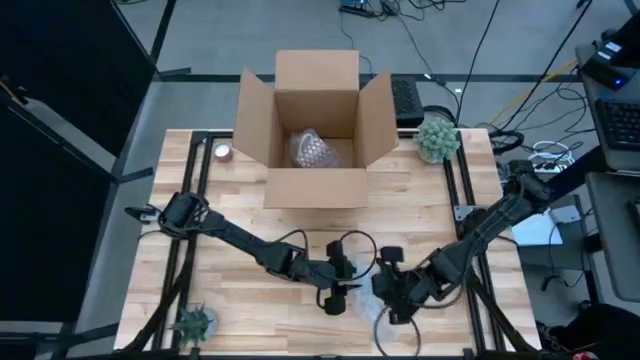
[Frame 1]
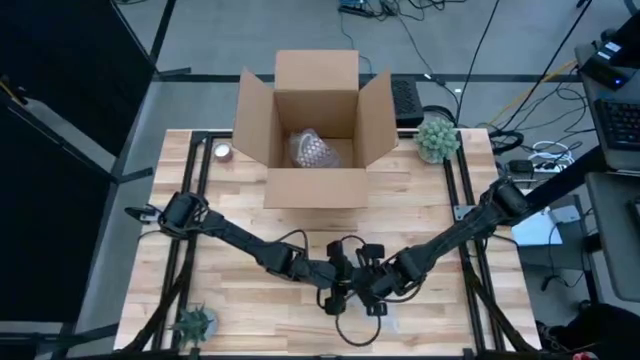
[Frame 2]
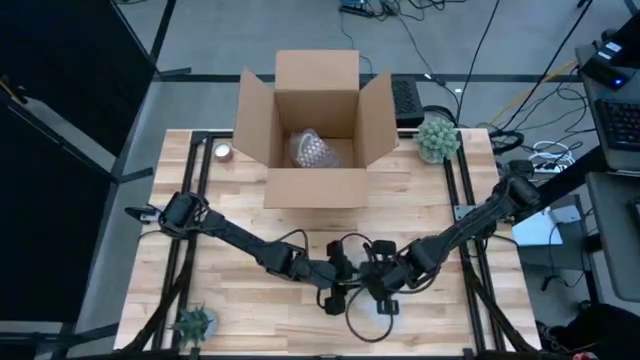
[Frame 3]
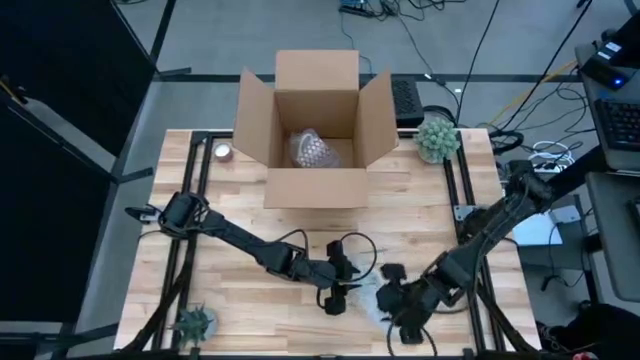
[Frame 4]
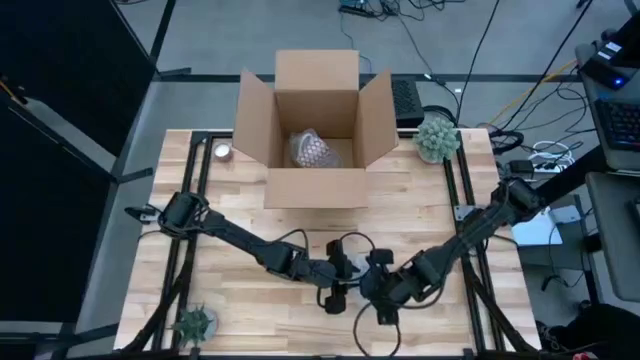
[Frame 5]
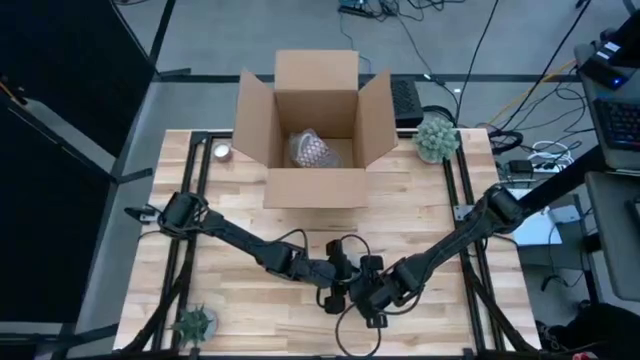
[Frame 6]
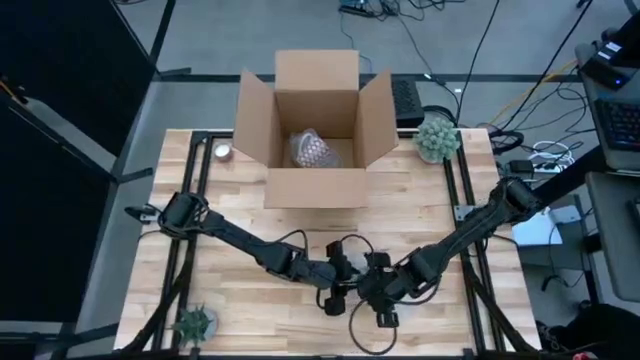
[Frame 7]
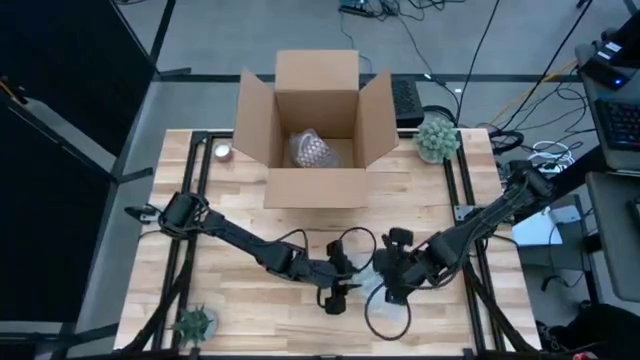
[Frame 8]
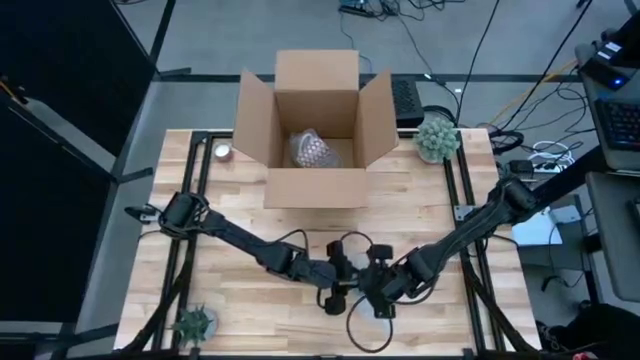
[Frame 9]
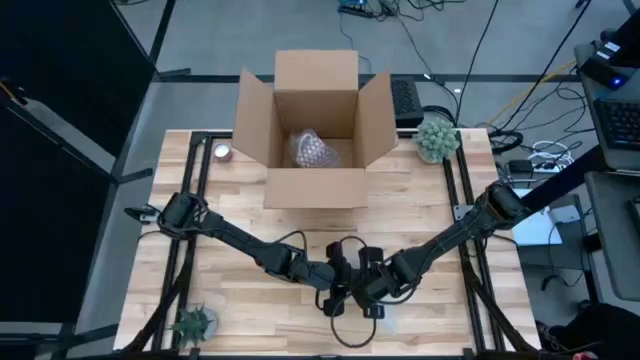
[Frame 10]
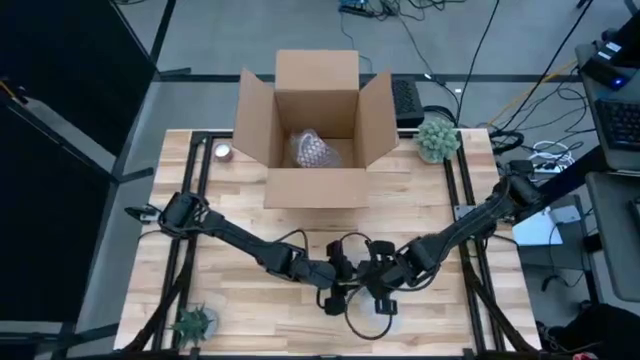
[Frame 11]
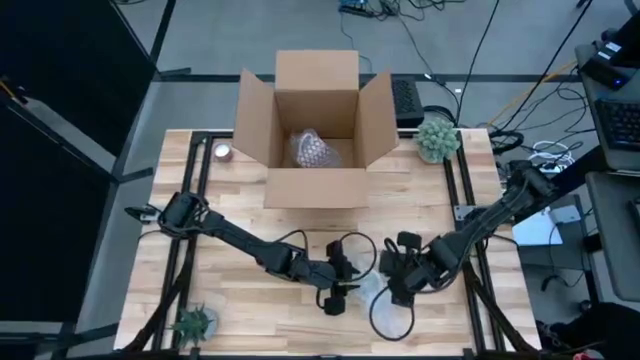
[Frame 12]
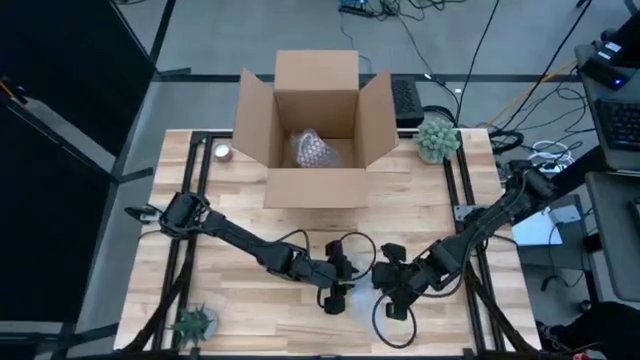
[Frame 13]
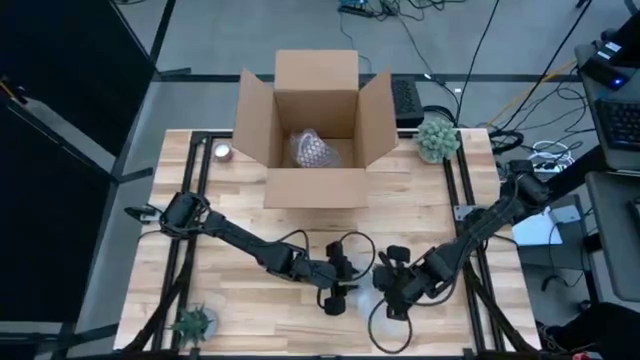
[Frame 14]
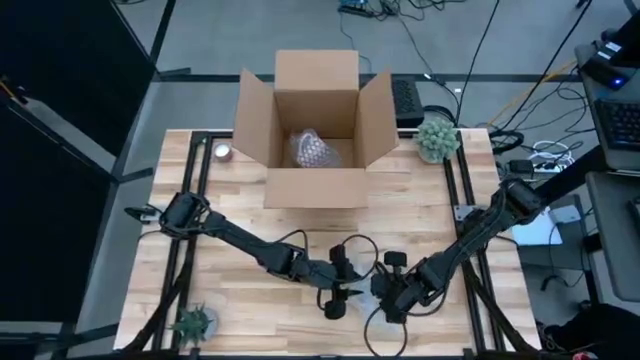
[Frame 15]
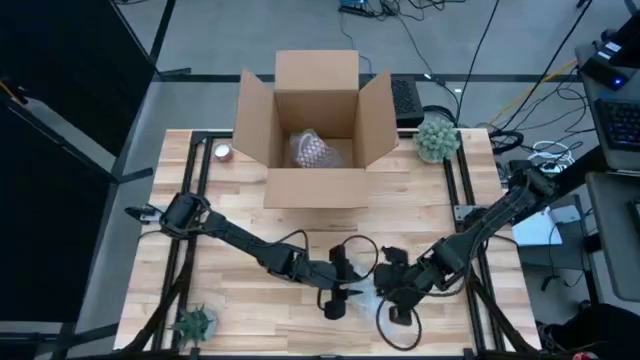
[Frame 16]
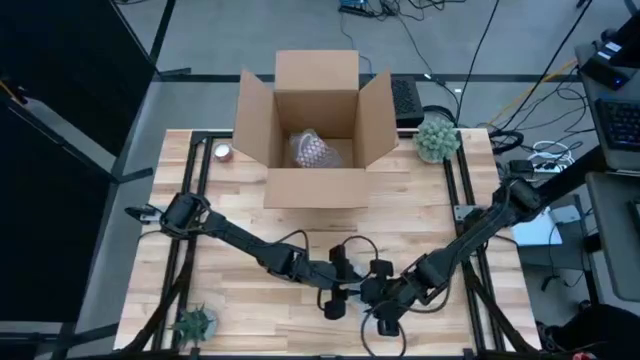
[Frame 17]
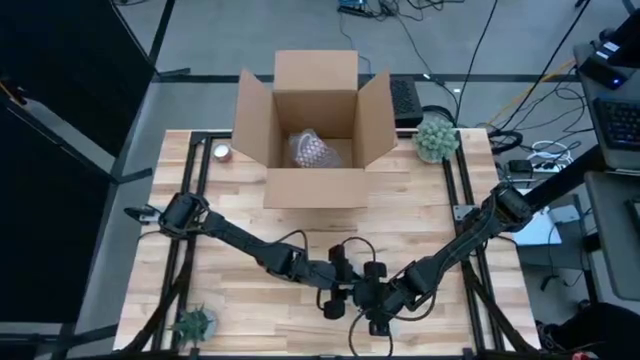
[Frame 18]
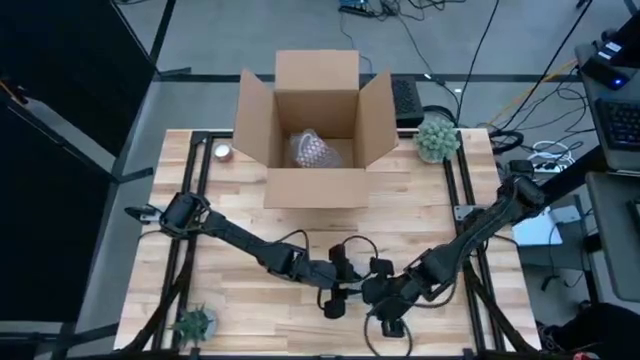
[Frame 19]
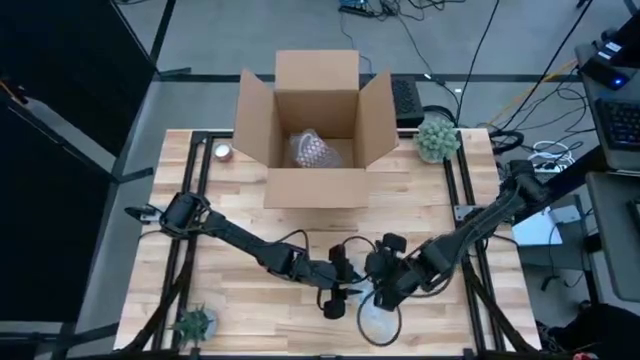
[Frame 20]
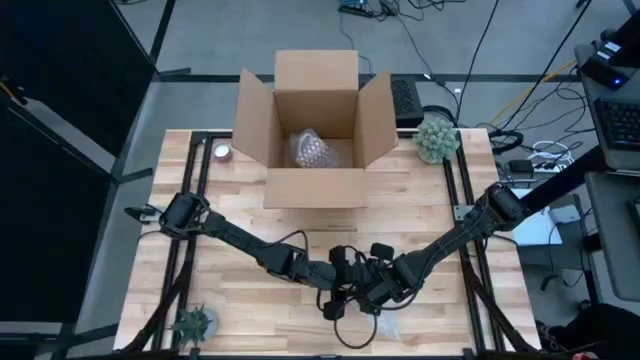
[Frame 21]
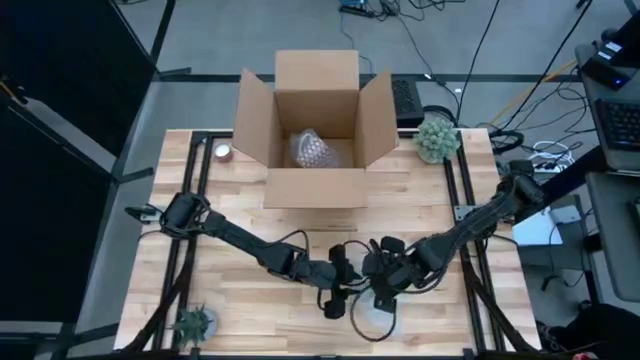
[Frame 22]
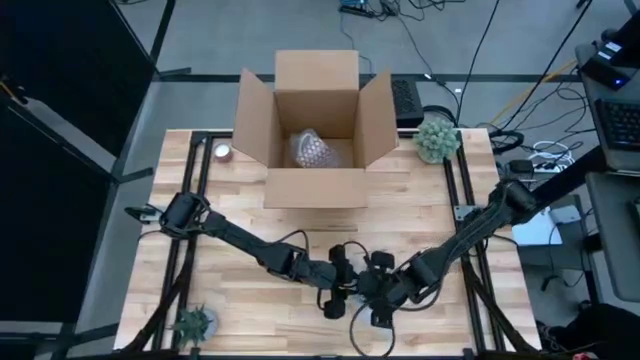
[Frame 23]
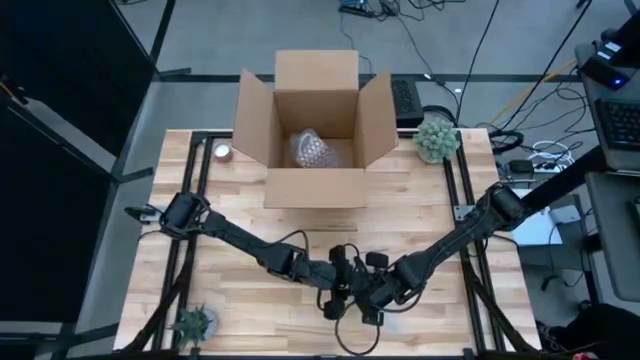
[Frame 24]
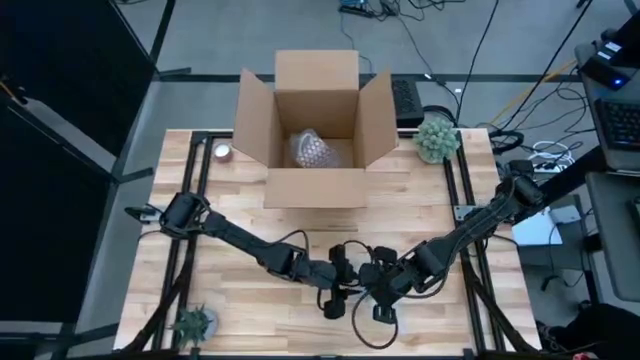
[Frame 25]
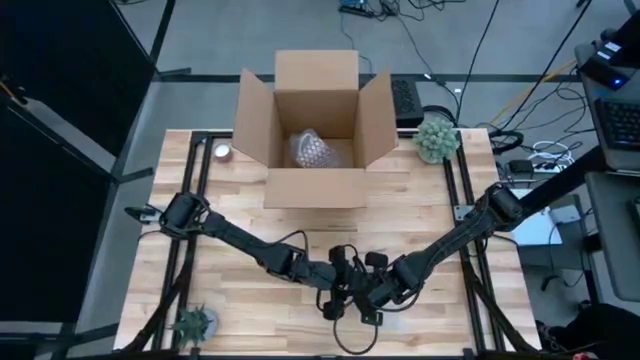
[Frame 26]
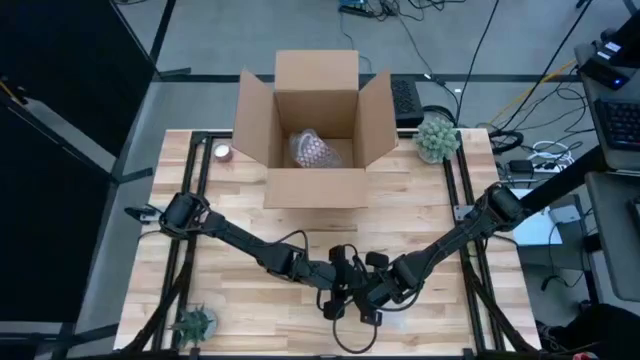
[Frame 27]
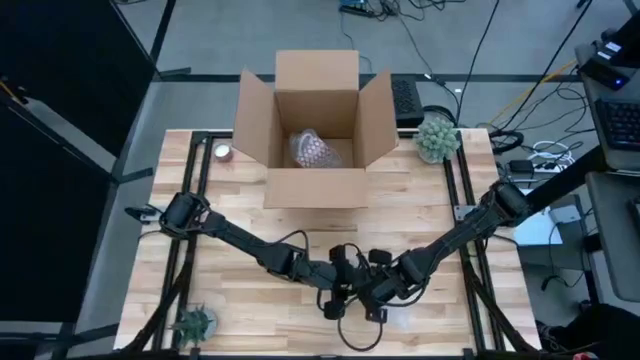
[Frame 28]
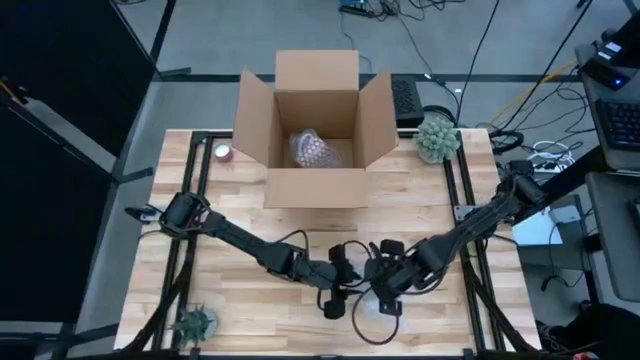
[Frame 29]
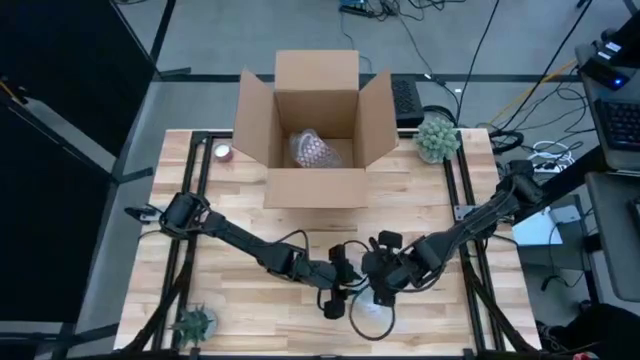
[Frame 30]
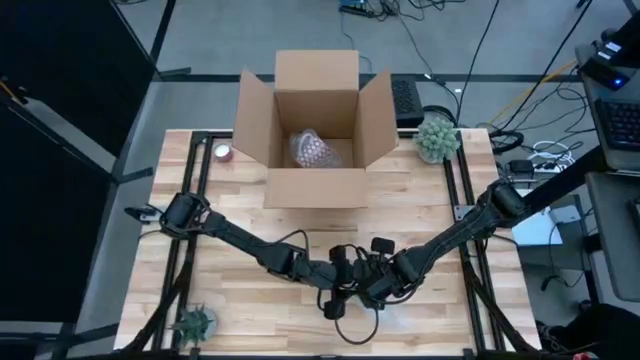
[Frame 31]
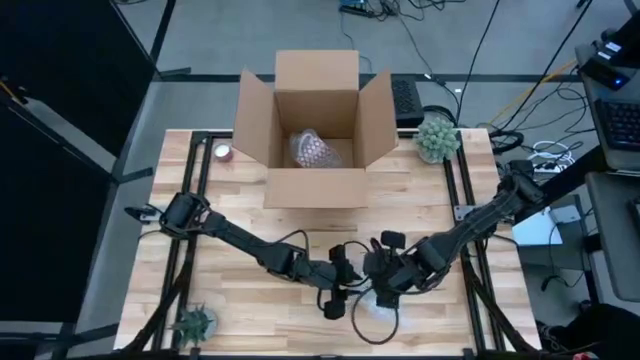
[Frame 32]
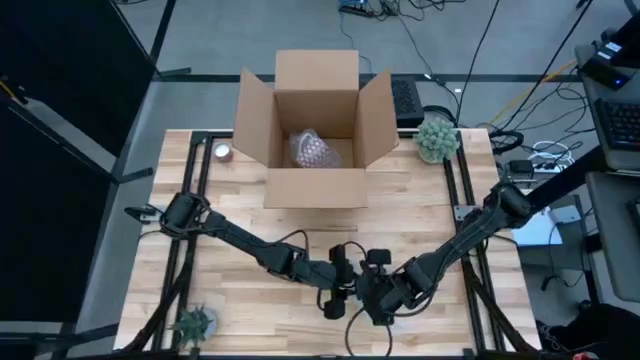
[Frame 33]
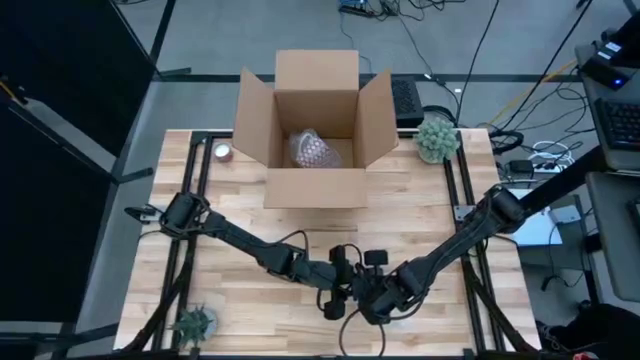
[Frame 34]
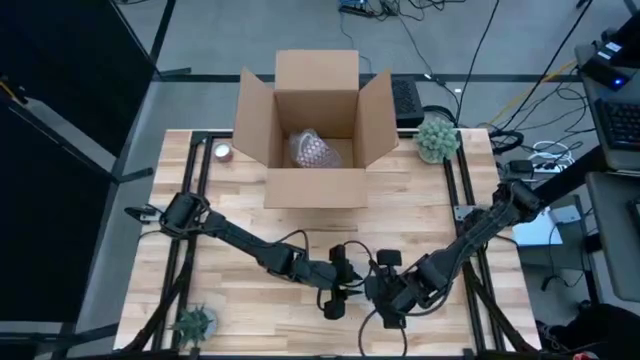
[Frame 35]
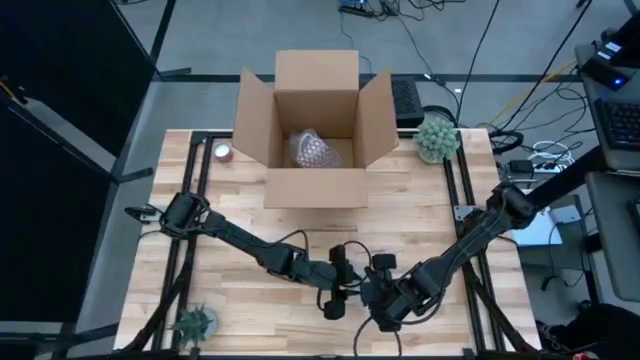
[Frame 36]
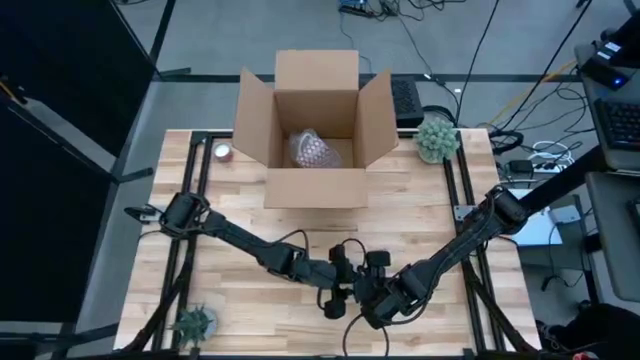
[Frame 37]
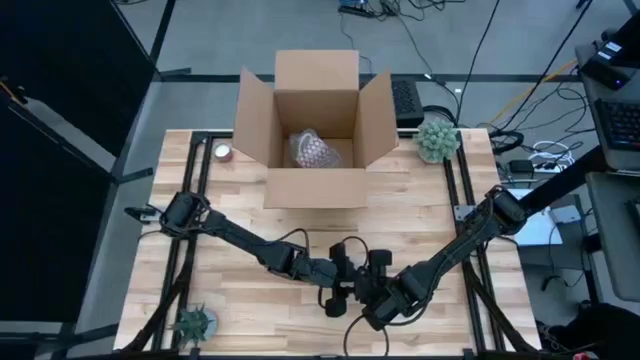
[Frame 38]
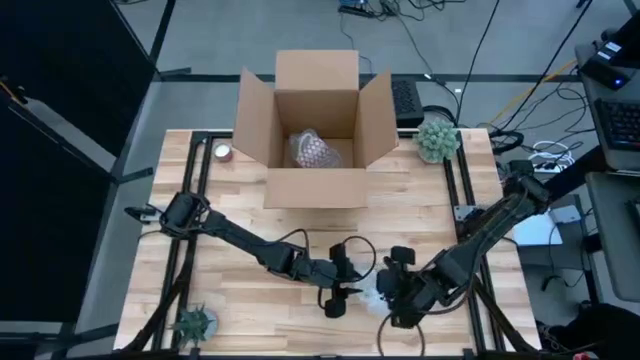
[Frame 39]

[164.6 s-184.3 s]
Task: wrap mug
Wrap the yellow mug with the bubble wrap

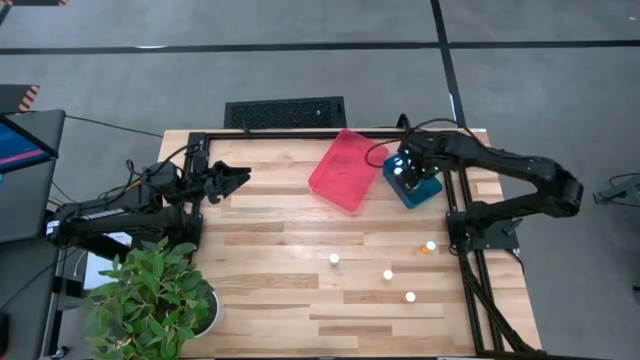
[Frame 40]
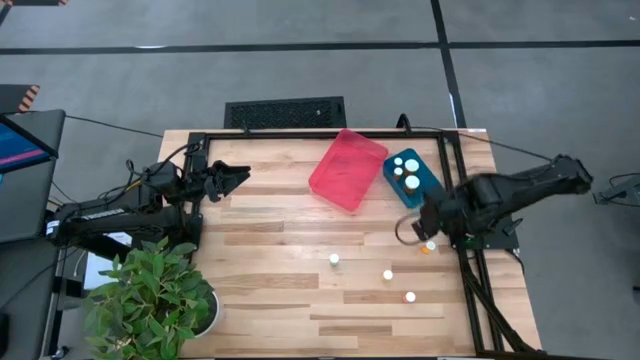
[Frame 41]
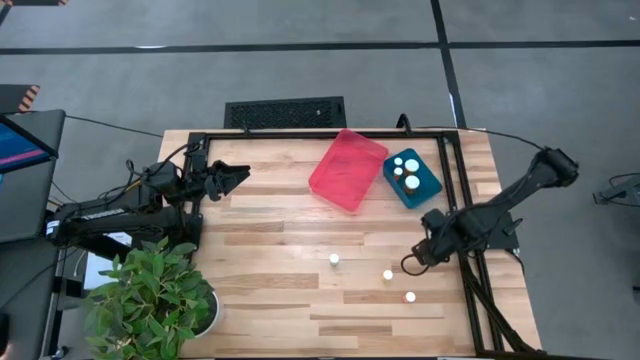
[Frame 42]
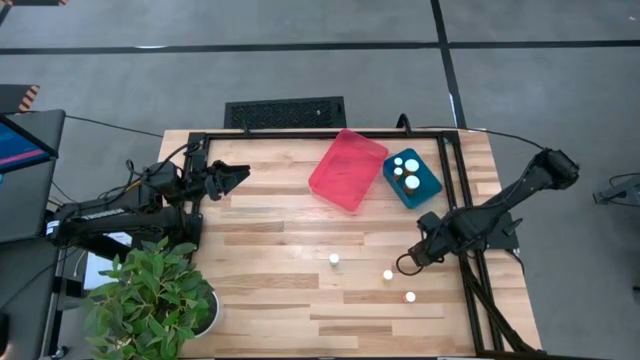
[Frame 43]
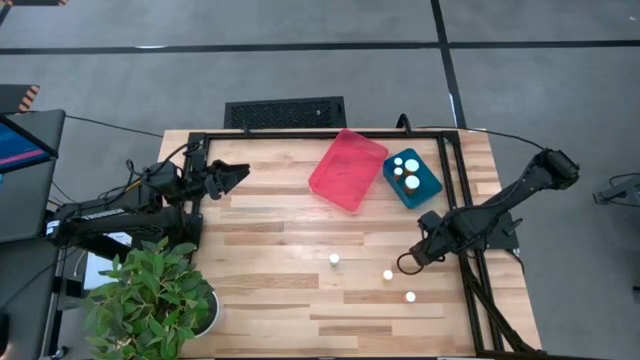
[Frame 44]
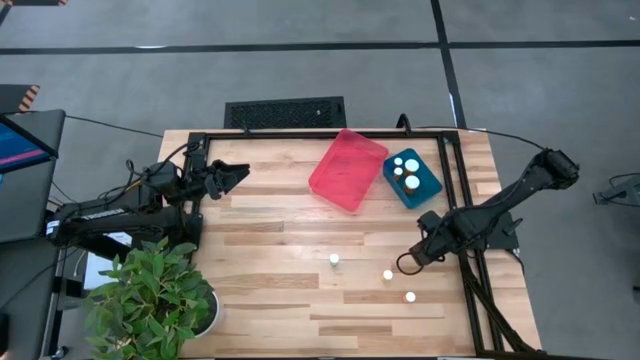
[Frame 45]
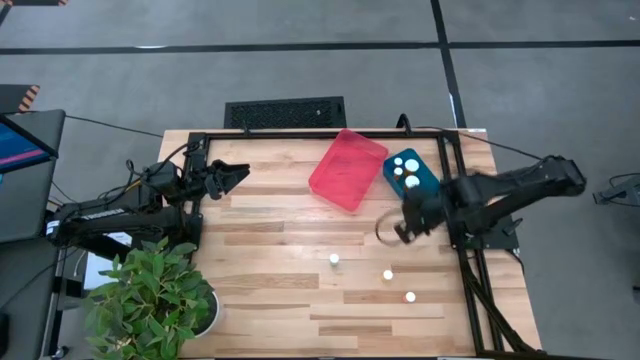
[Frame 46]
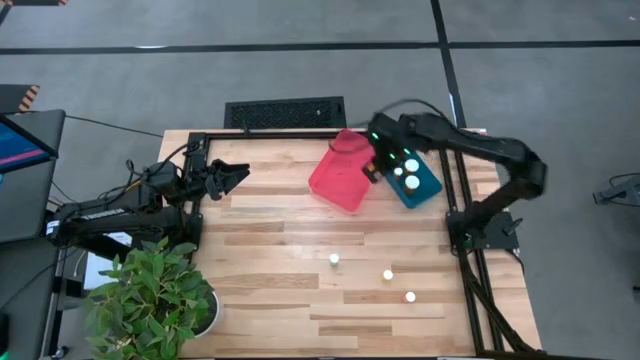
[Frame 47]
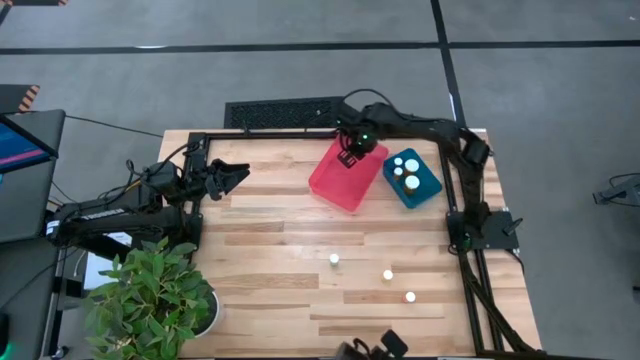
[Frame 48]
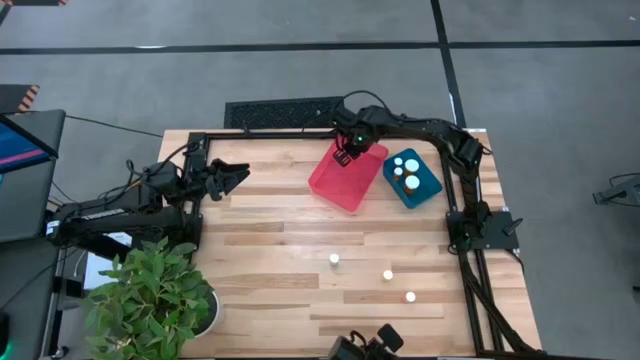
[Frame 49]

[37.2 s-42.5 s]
Task: Pick and place medicine bottles into bin by pill shape (circle, oval)
Put the small orange tablet bottle into the red bin
